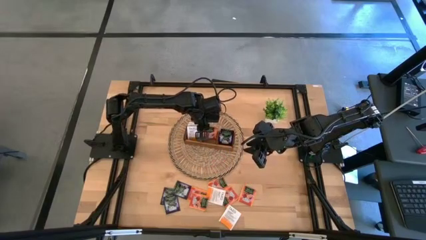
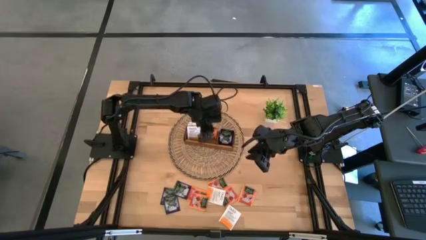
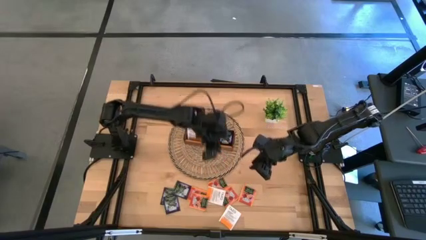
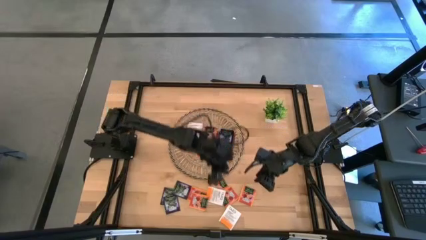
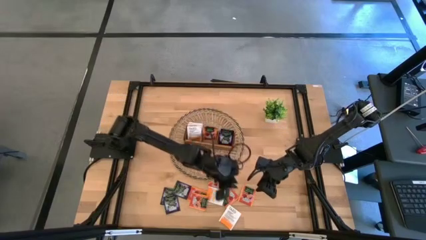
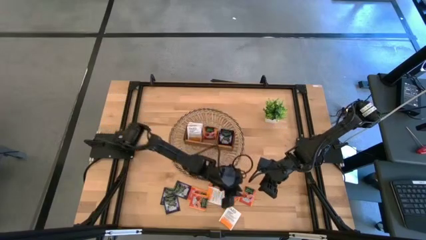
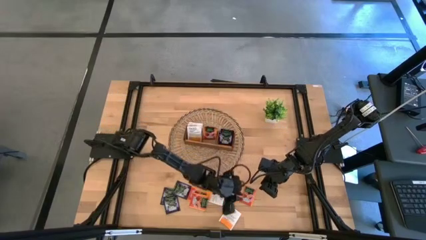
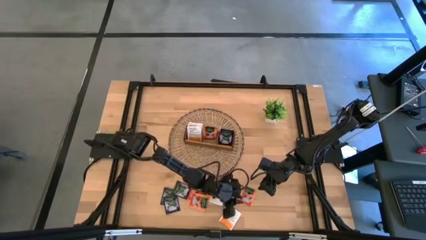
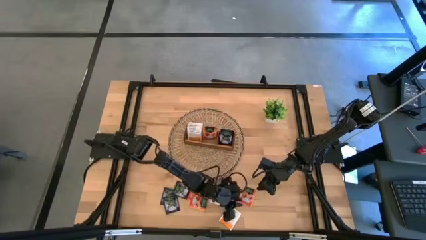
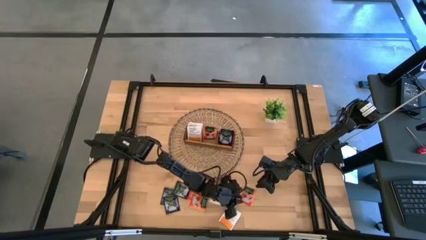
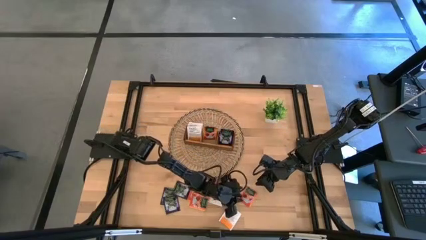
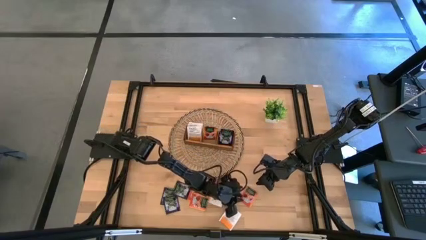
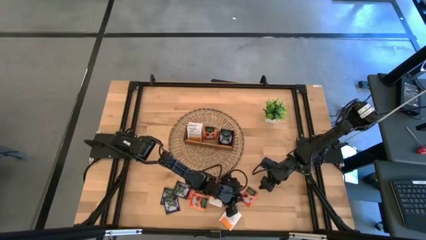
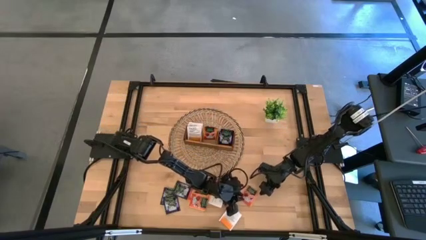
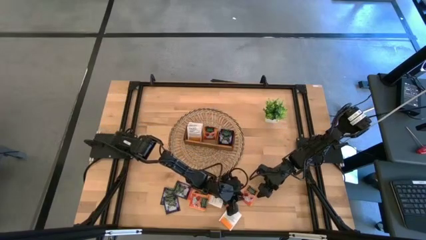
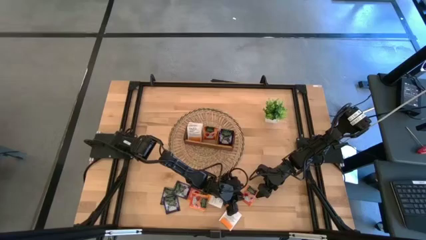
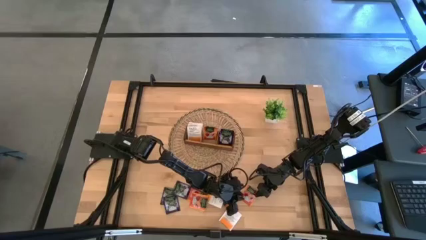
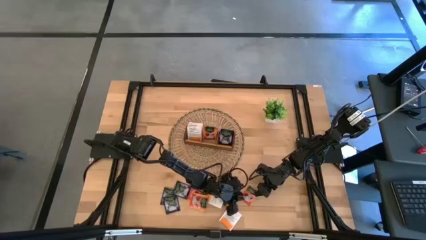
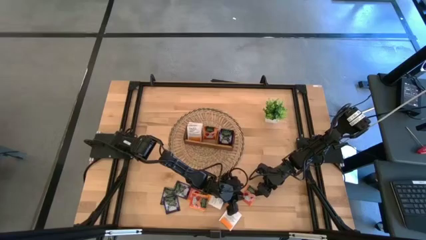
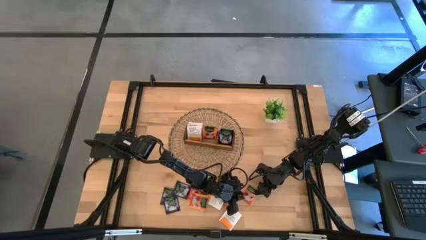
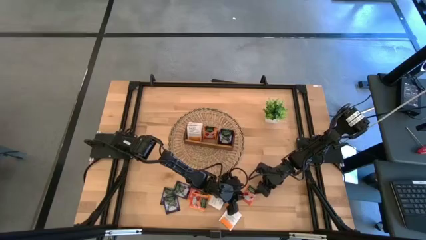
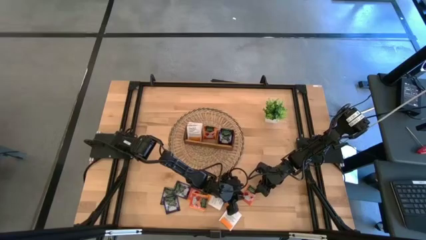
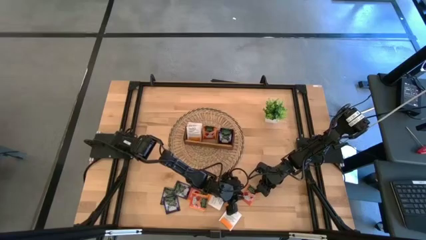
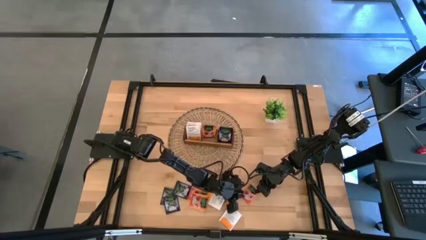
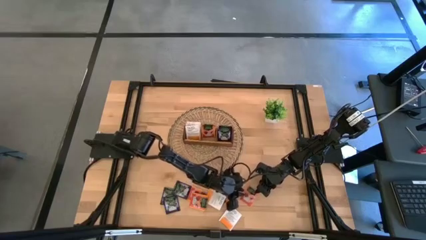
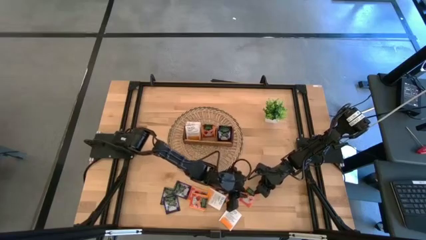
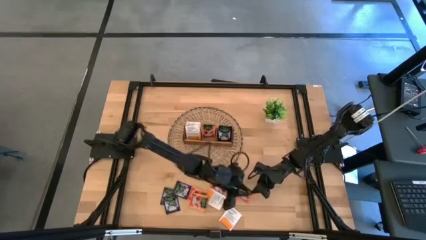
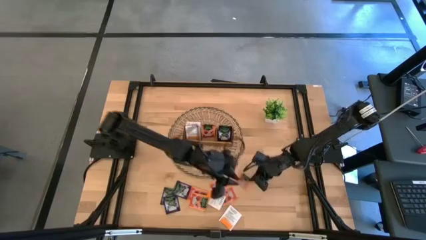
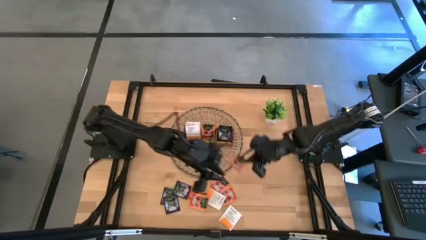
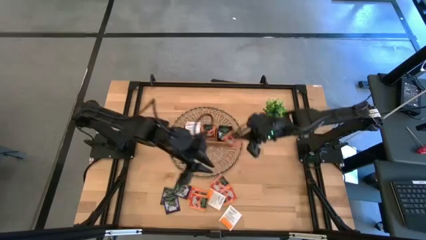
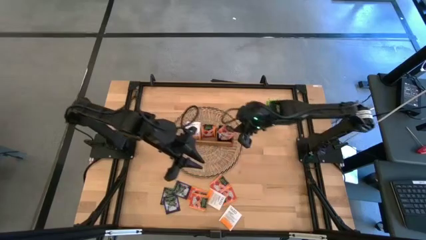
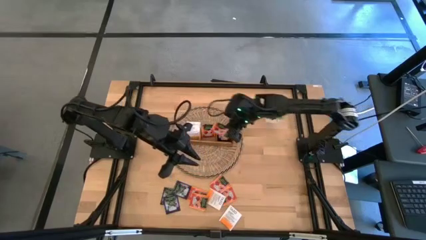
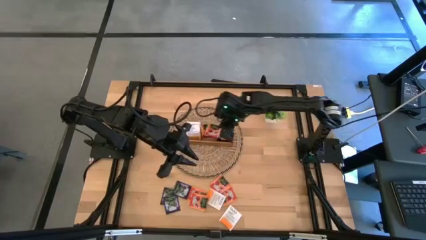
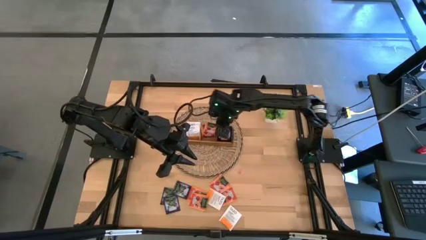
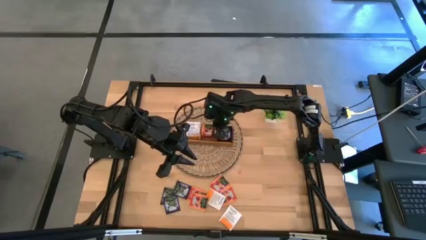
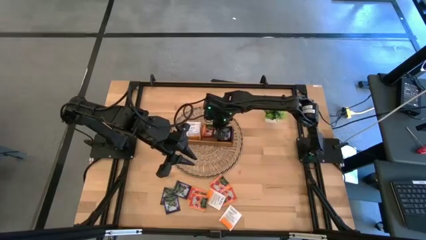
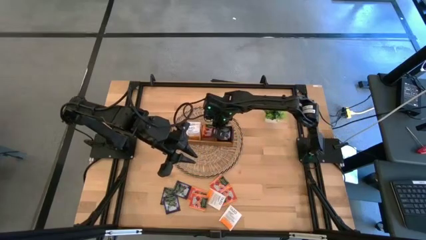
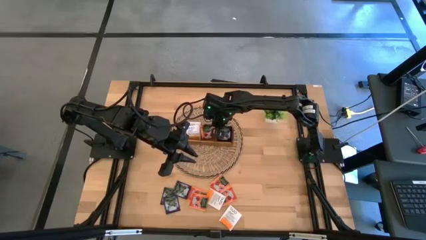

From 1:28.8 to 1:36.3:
Task: Pick & Place Tea
Put the orange tea bag into the middle section of the wooden organizer

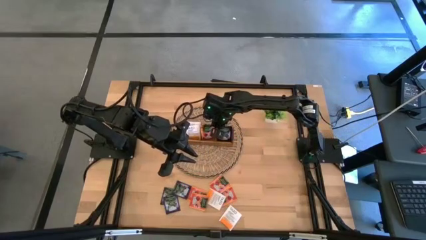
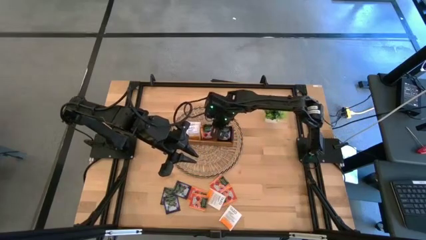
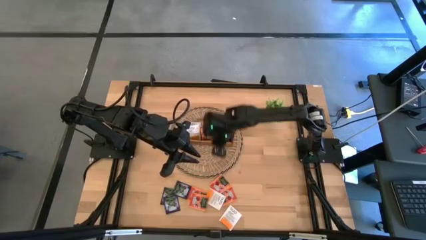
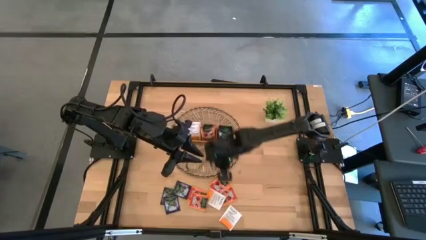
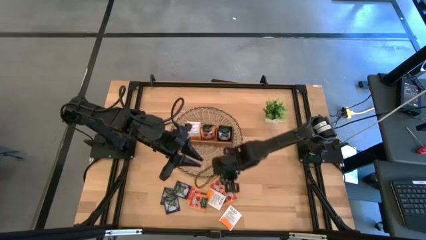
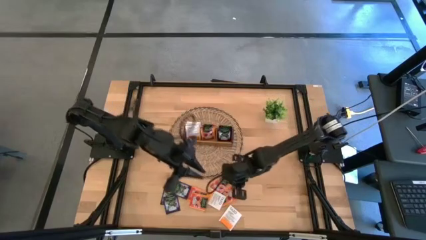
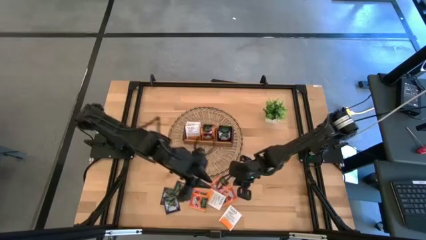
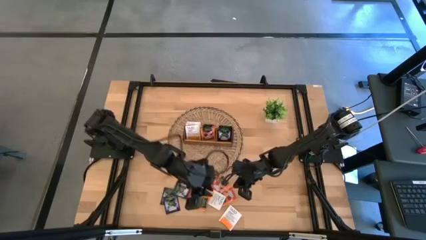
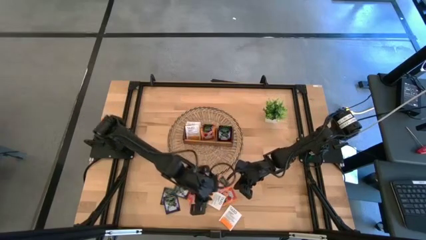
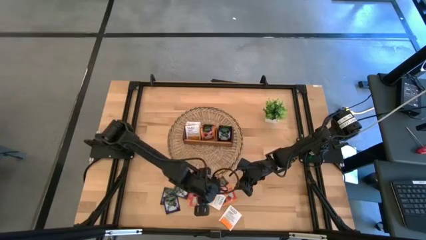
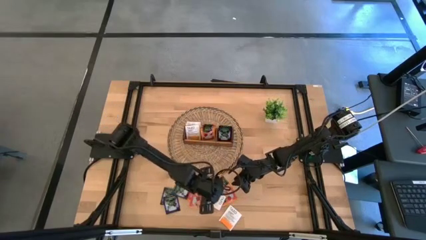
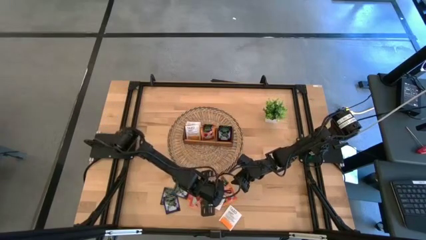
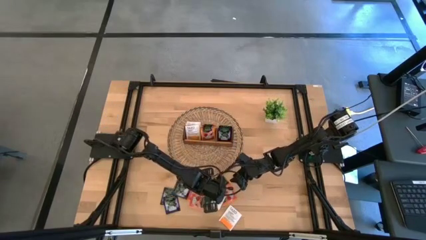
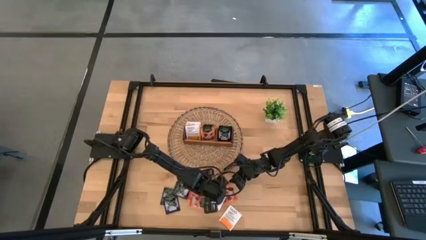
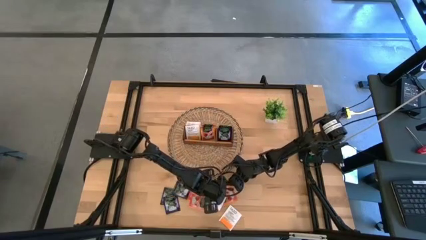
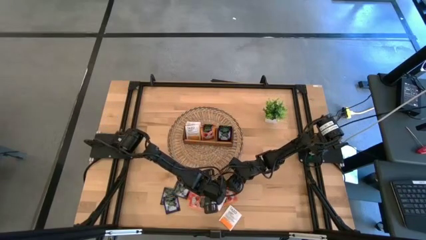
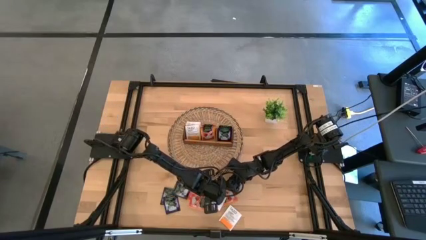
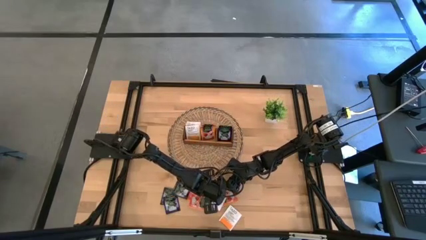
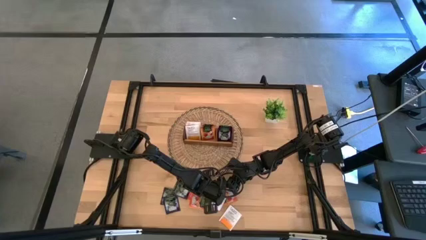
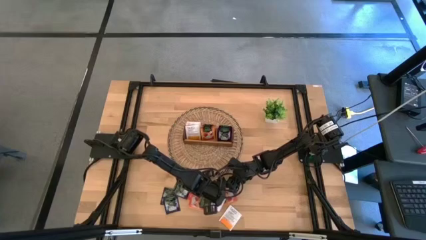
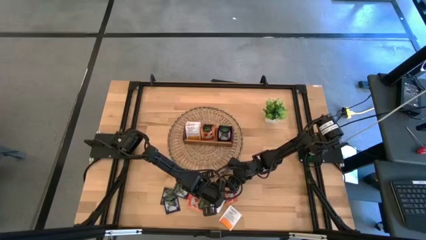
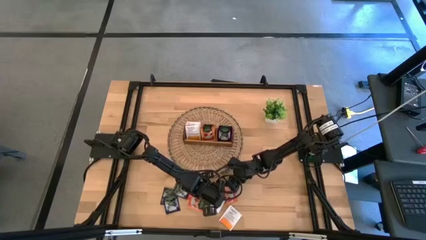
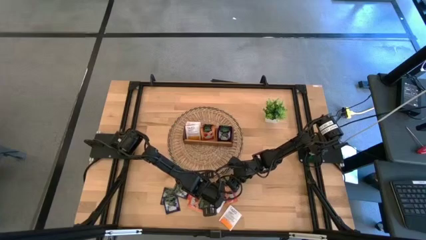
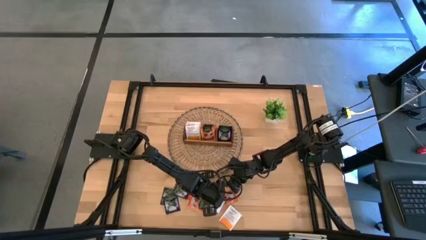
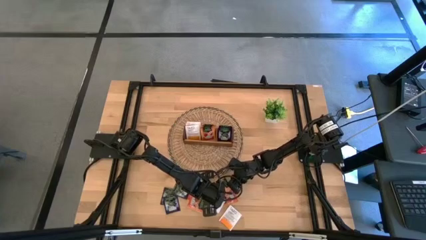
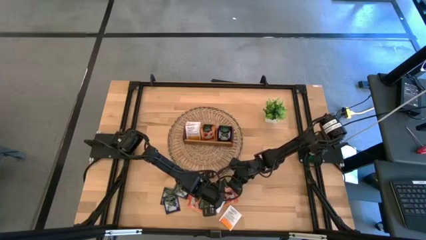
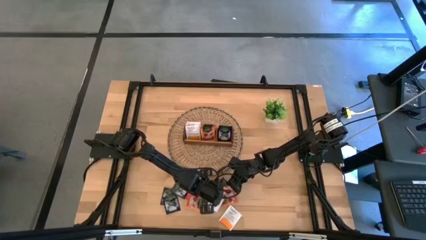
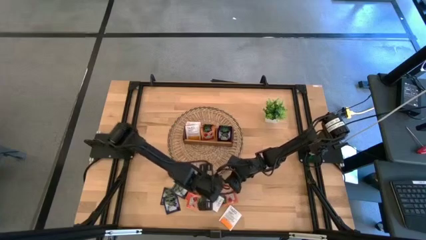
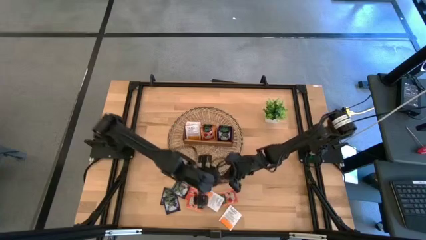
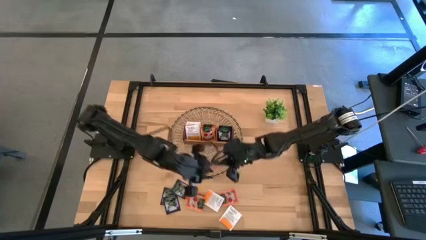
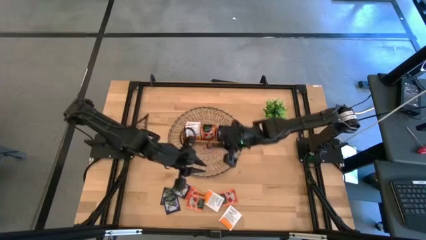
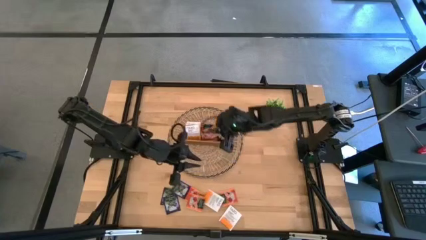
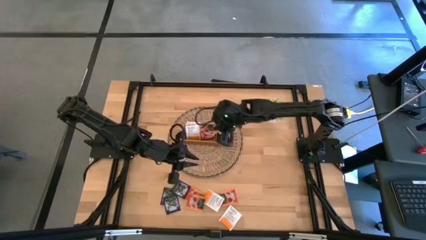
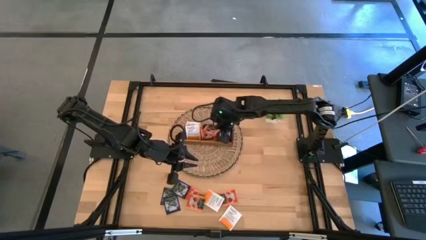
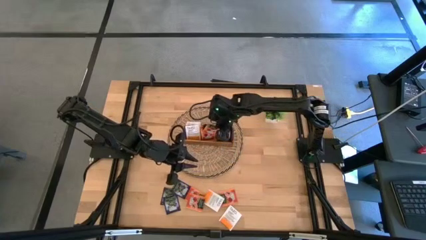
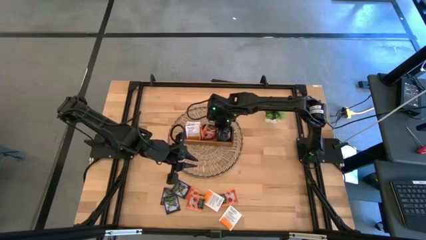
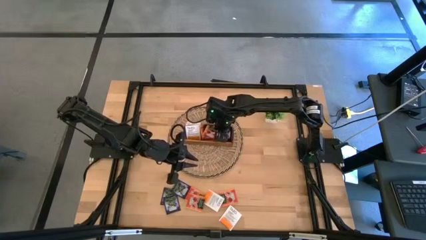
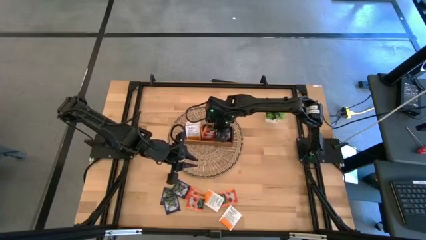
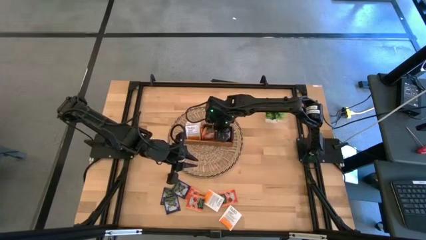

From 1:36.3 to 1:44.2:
Put the orange tea bag into the middle section of the wooden organizer
